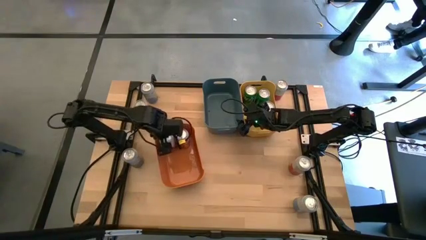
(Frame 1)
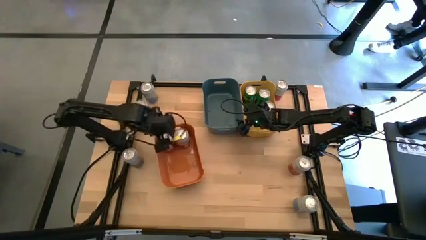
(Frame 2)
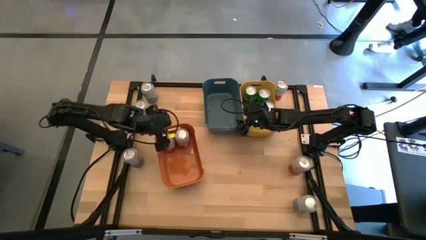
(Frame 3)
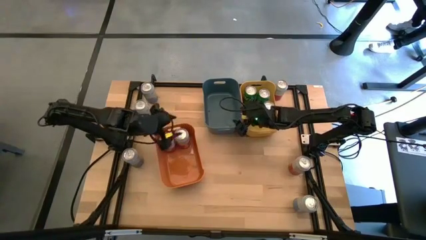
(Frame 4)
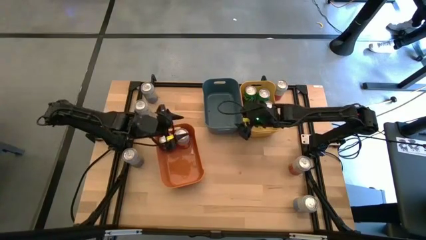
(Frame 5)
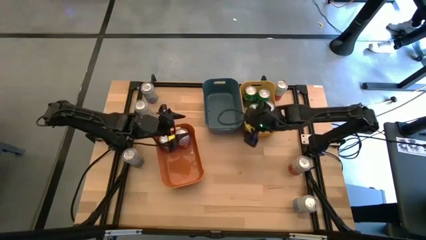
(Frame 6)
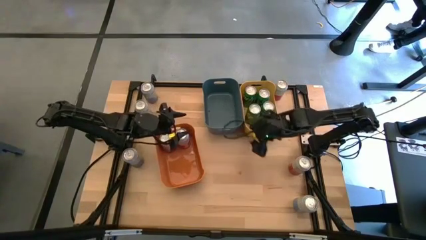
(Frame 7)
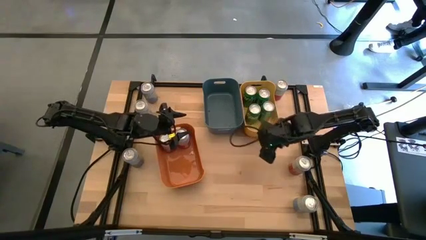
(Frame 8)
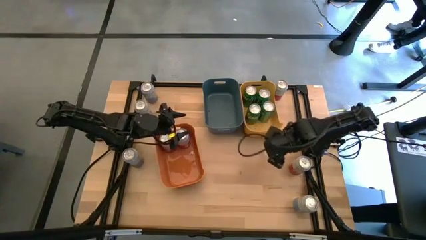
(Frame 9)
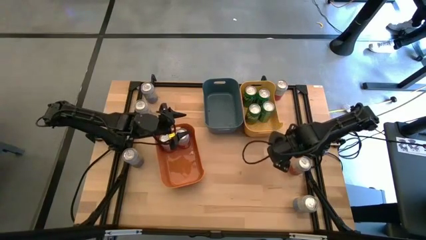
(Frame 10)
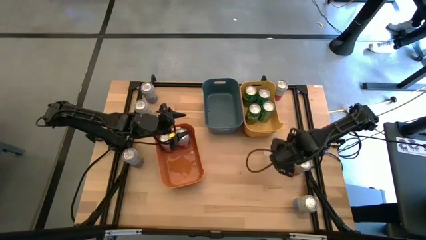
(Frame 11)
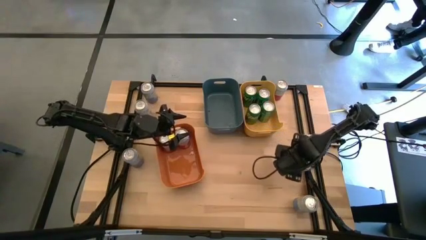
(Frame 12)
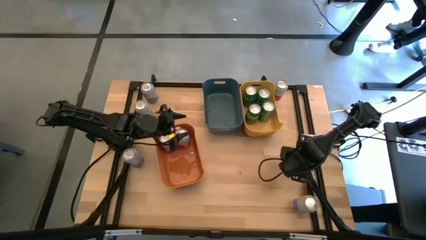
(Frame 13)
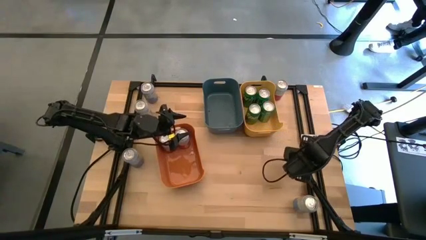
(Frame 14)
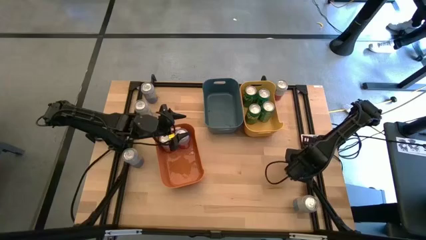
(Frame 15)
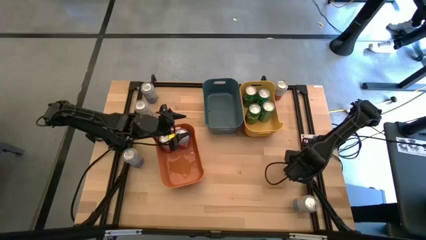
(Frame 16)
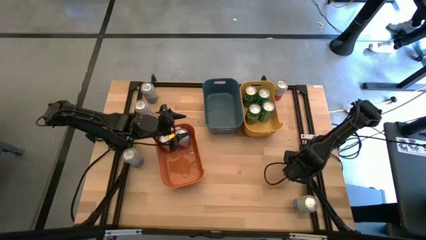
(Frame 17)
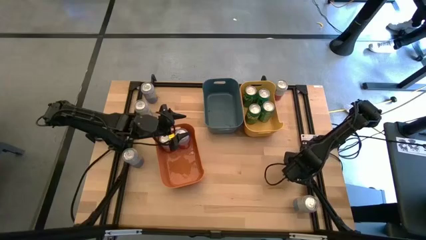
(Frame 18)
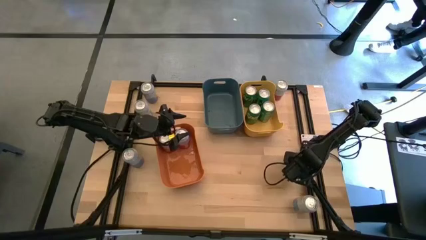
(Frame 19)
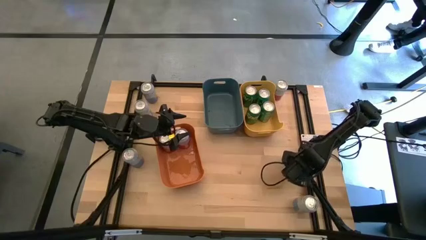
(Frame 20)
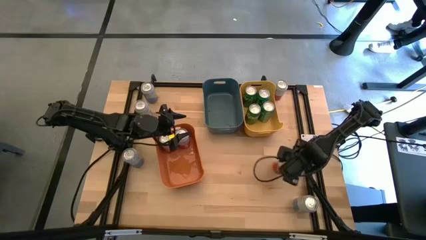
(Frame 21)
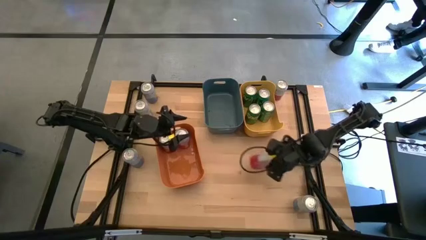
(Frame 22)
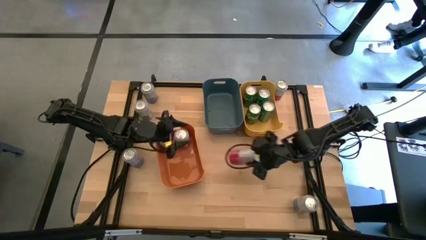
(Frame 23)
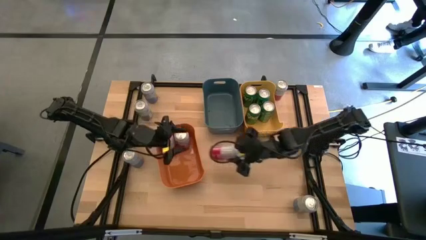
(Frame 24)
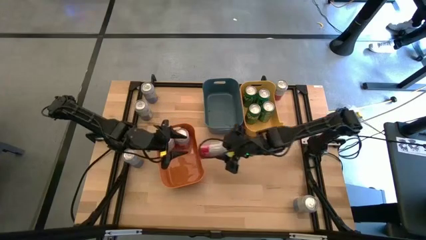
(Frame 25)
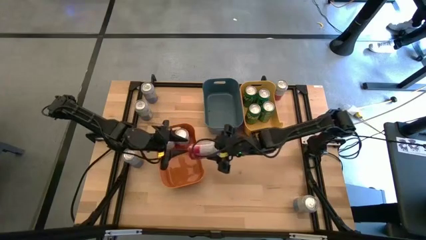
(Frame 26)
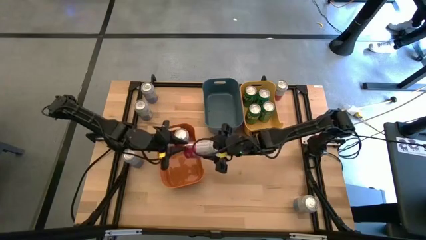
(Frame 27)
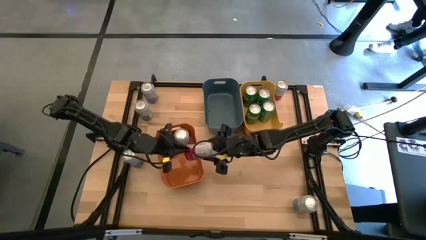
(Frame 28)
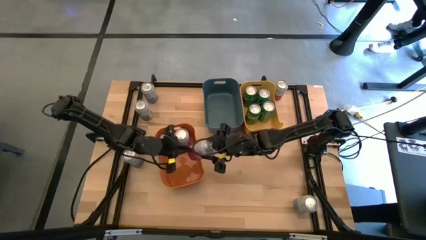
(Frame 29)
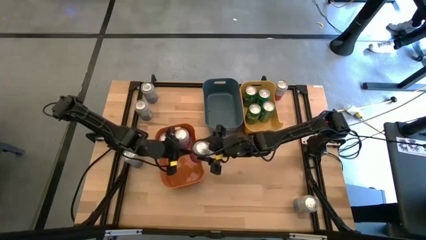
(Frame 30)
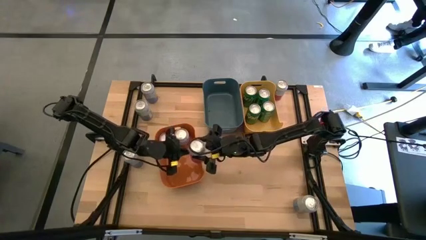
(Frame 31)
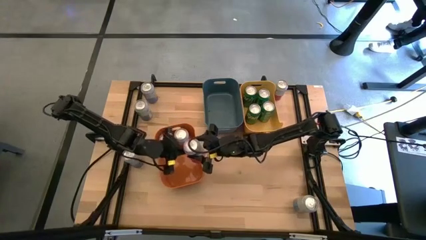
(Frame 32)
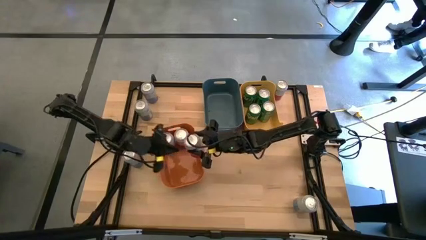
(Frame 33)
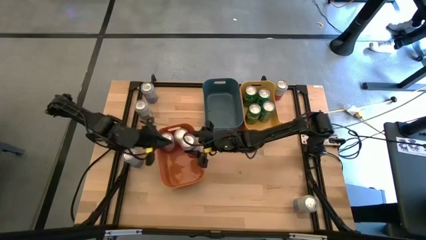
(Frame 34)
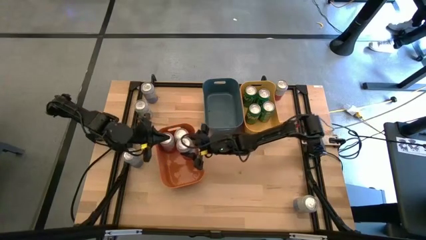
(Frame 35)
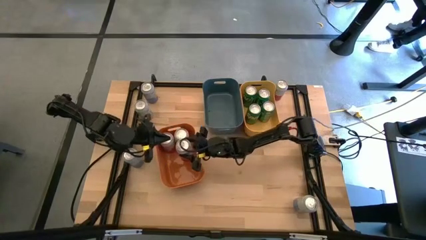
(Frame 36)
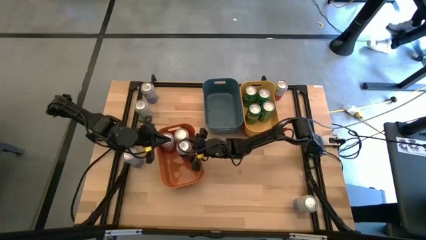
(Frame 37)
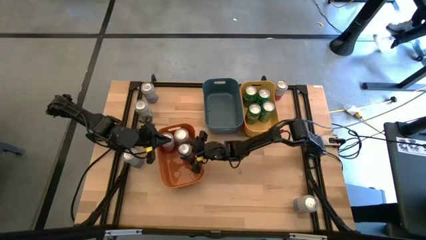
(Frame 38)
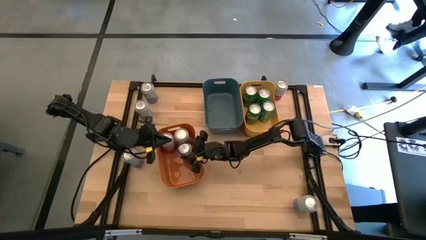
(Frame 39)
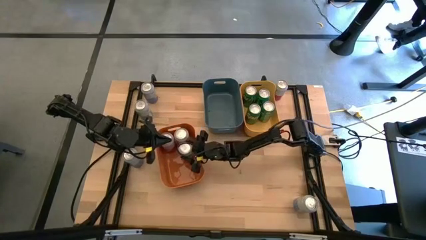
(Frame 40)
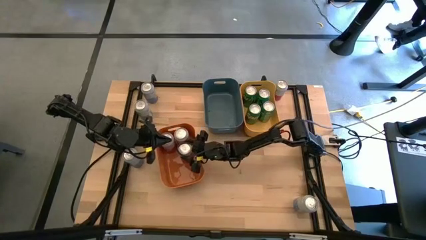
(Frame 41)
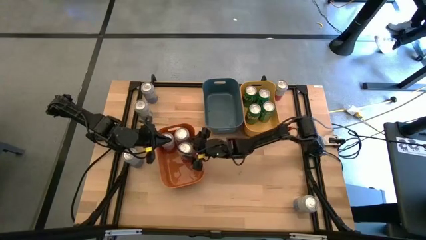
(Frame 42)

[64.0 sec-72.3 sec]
Task: Sort soda cans
Put the pink-white soda can into the orange bin
